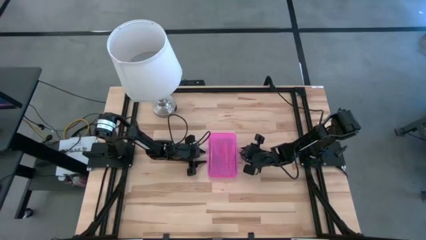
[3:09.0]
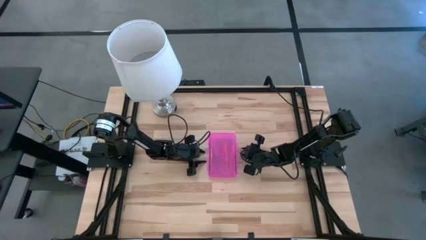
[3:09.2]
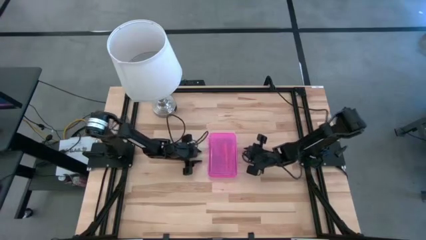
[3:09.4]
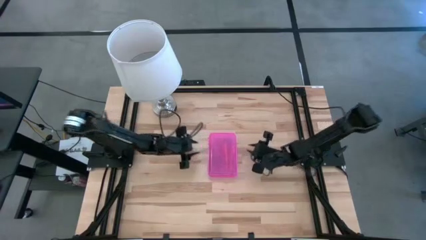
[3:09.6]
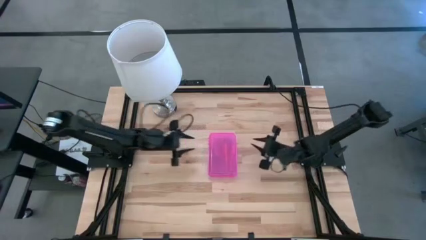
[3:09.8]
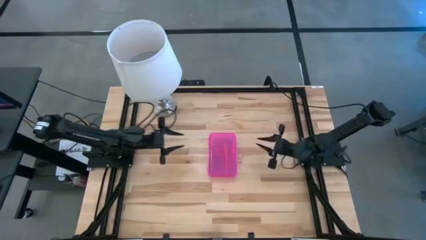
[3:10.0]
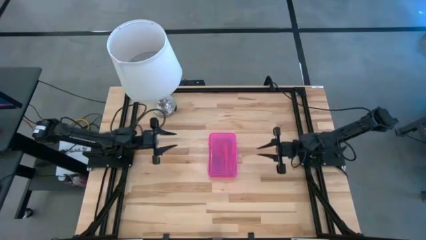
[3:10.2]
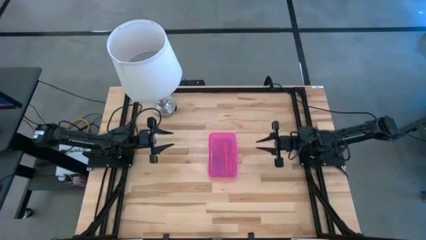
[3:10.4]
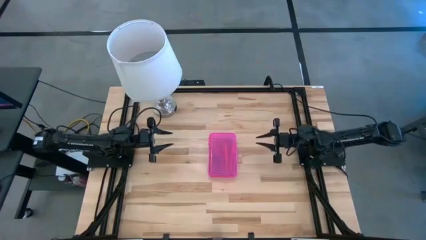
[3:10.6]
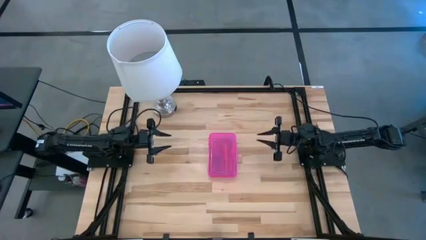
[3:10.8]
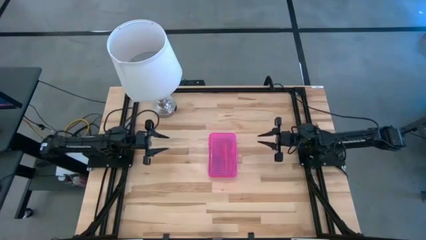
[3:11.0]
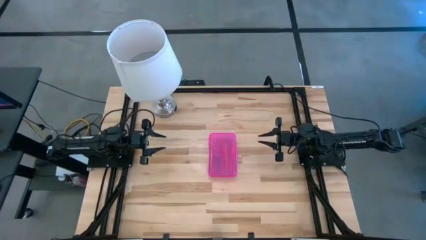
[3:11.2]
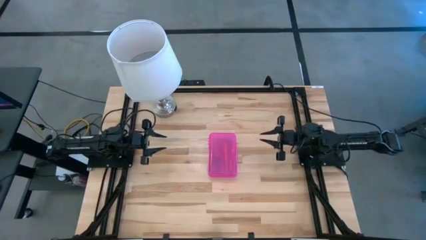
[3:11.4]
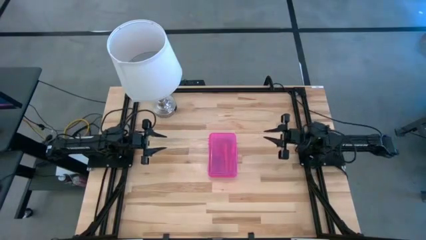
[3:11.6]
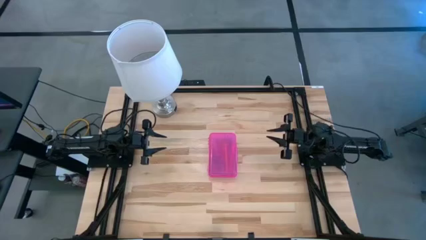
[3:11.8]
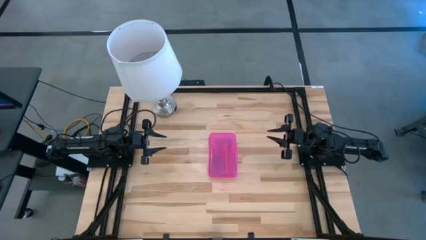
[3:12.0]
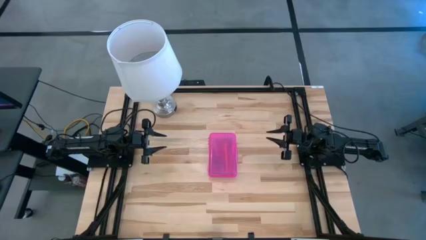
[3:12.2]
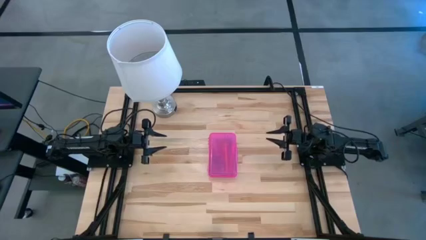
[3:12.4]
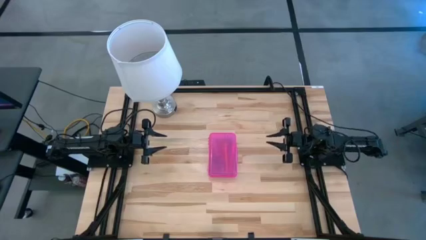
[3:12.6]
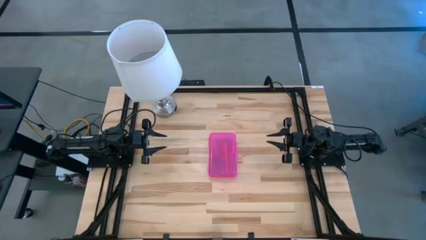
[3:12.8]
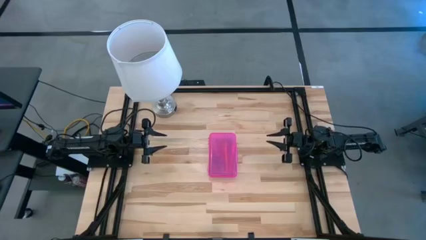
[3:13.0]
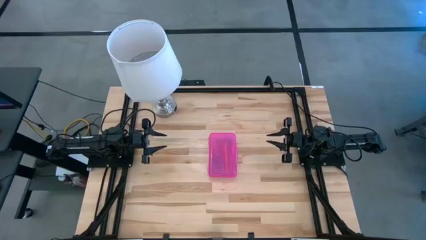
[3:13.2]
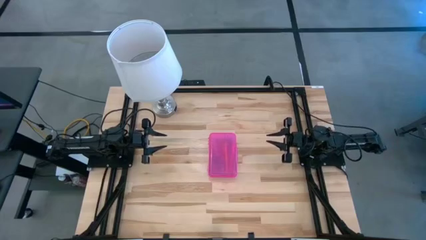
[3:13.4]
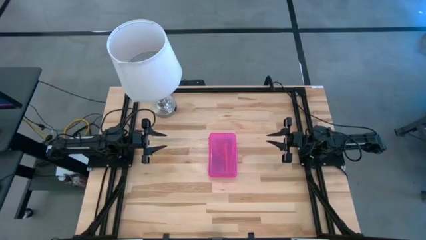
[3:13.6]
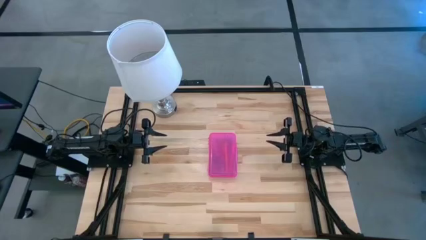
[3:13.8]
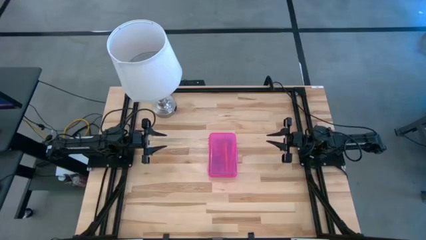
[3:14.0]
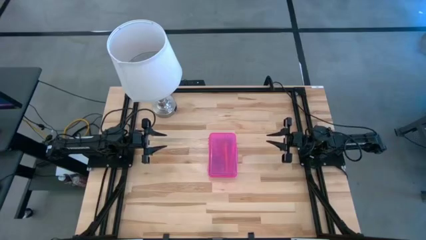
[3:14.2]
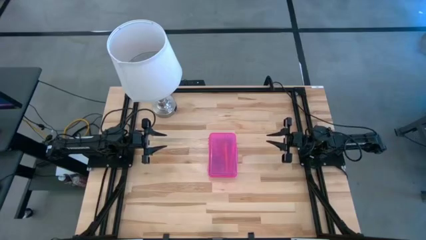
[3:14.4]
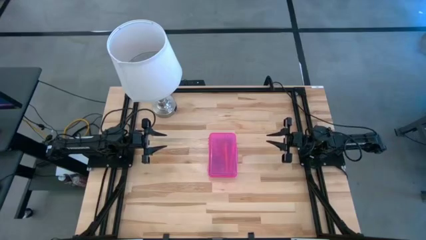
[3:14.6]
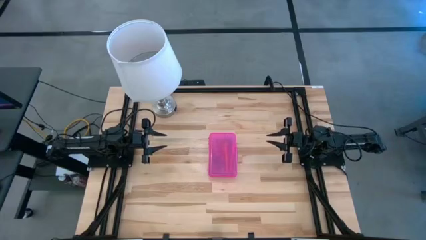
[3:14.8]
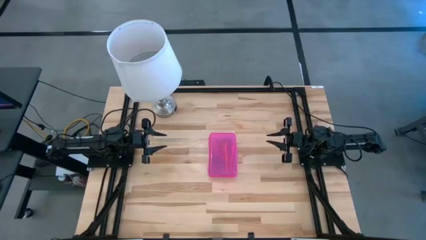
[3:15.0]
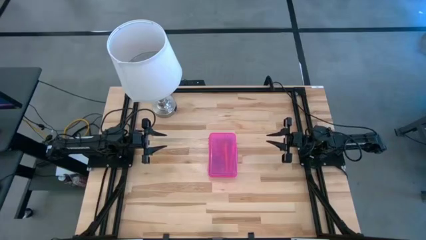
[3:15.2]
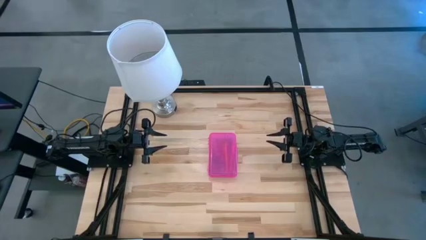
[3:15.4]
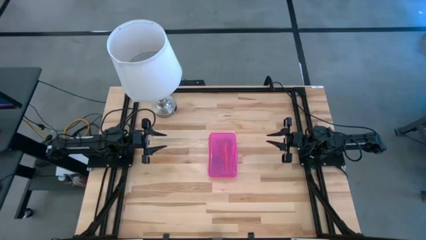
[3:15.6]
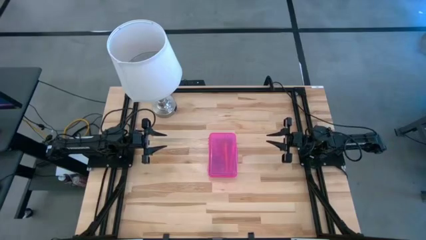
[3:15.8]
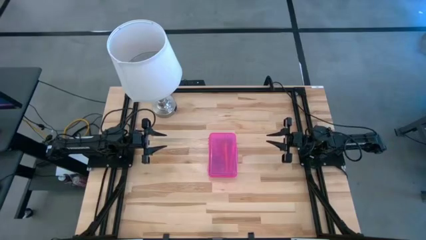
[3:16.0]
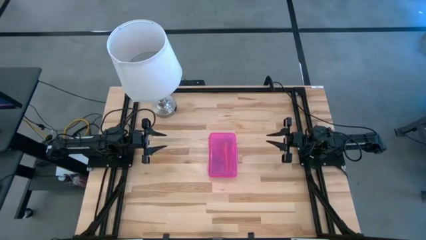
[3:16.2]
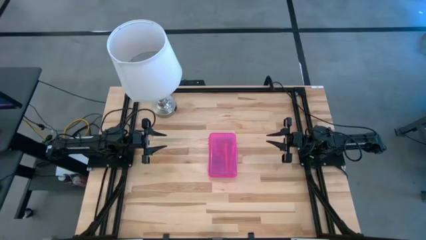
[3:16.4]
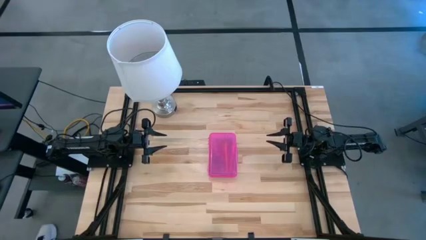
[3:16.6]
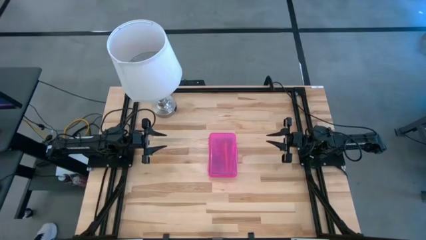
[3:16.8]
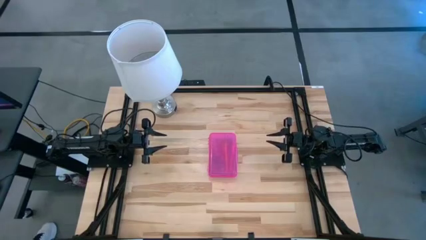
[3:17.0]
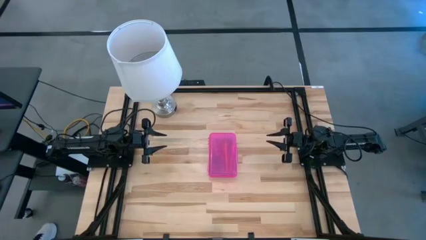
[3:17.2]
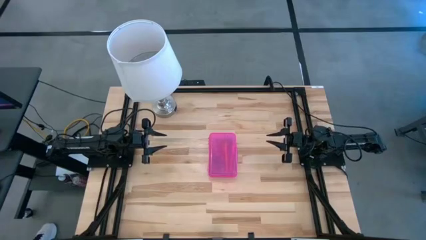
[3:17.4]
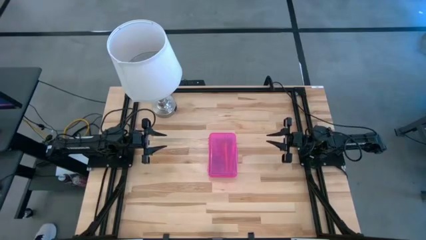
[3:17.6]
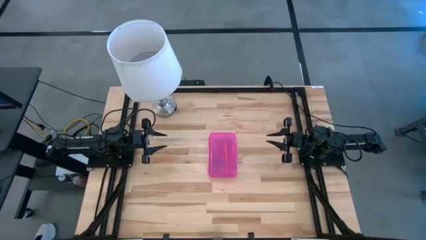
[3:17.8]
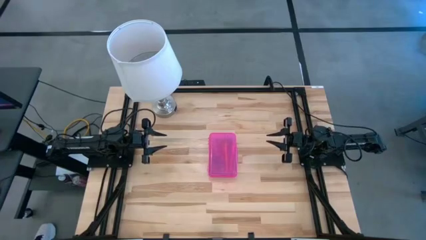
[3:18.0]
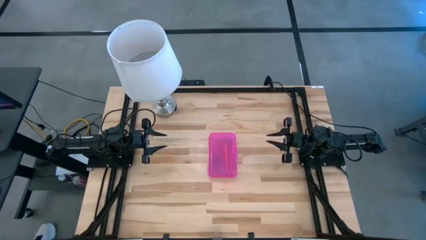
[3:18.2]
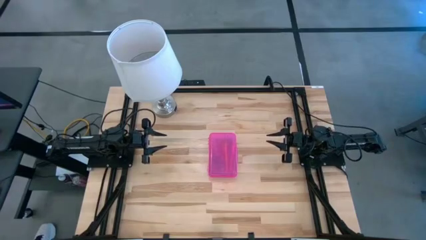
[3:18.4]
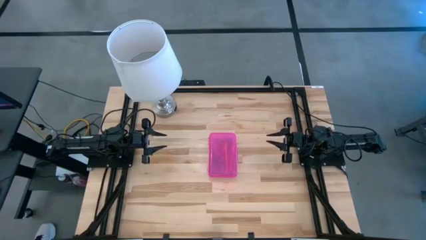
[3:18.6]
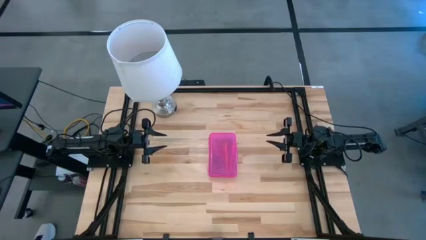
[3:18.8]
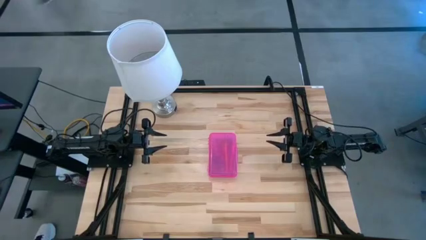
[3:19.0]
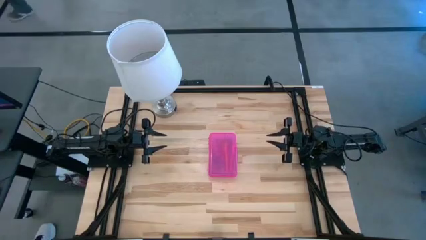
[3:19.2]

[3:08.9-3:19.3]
Task: Pick & place school supplies into a supply box
Return to Home Position

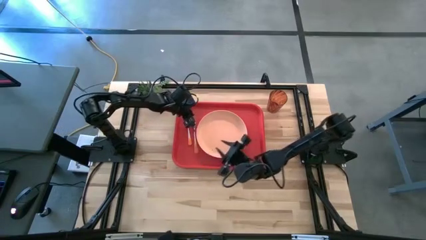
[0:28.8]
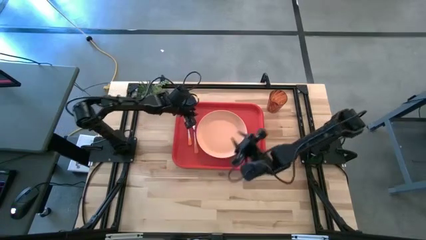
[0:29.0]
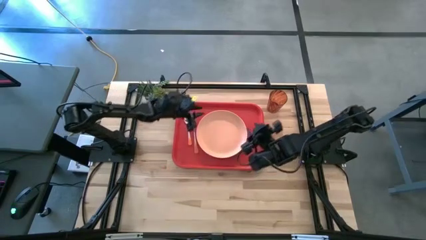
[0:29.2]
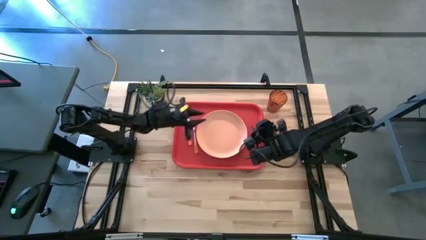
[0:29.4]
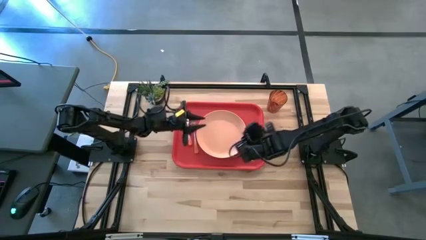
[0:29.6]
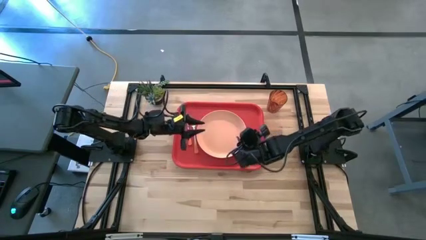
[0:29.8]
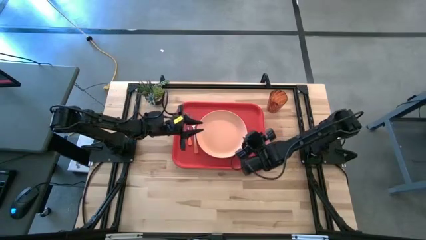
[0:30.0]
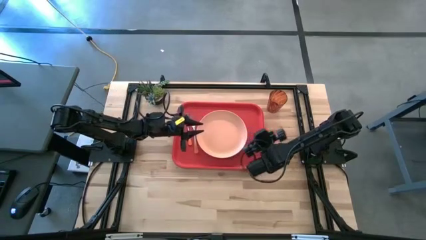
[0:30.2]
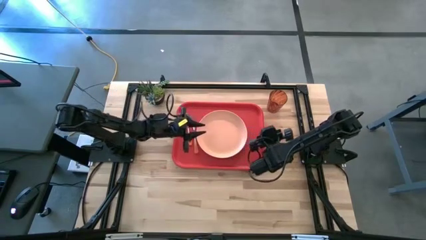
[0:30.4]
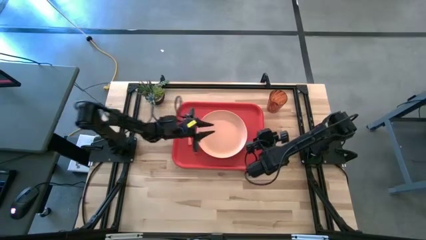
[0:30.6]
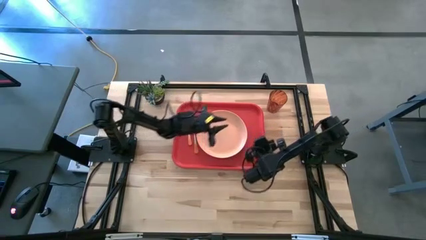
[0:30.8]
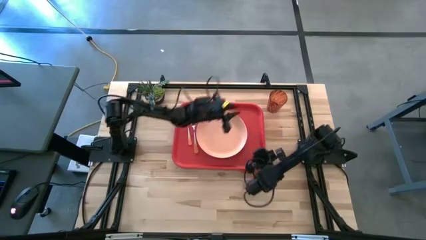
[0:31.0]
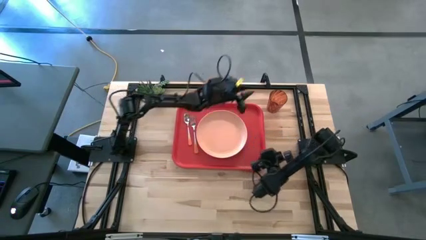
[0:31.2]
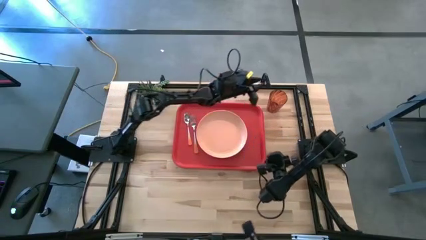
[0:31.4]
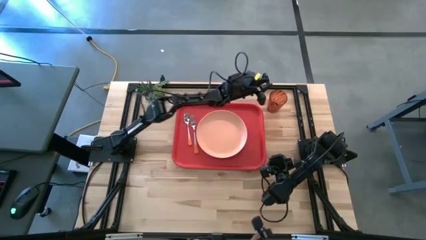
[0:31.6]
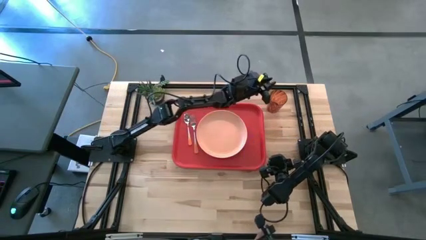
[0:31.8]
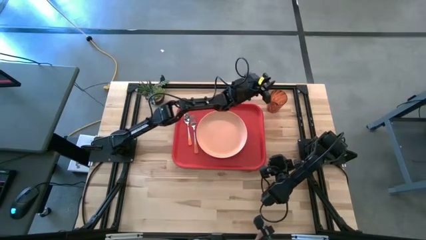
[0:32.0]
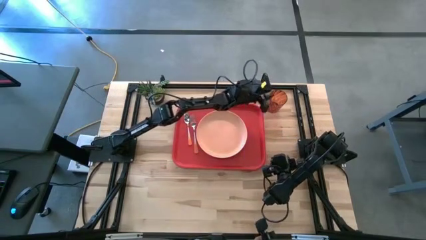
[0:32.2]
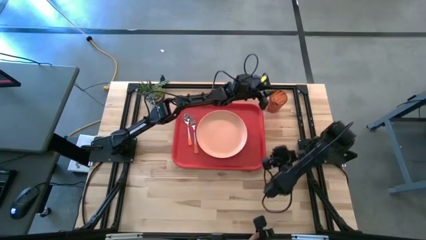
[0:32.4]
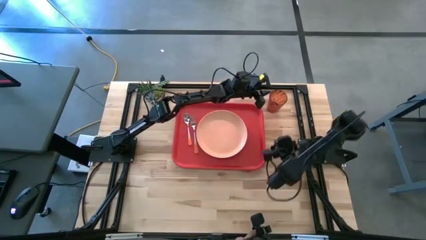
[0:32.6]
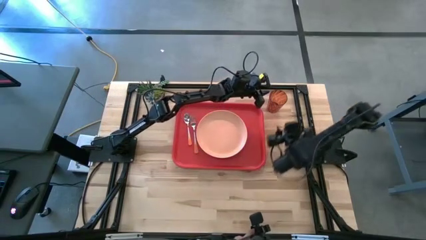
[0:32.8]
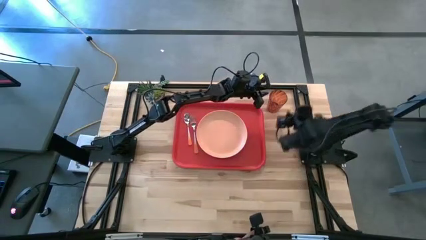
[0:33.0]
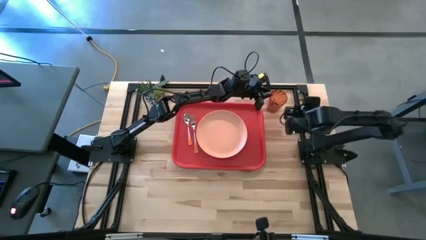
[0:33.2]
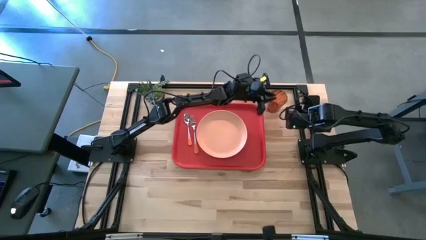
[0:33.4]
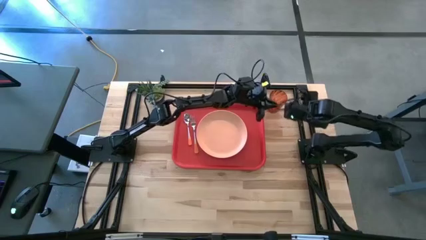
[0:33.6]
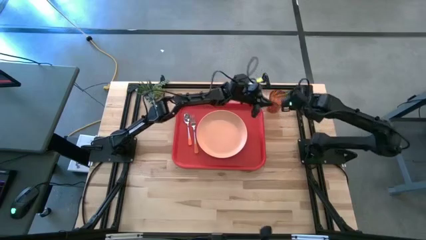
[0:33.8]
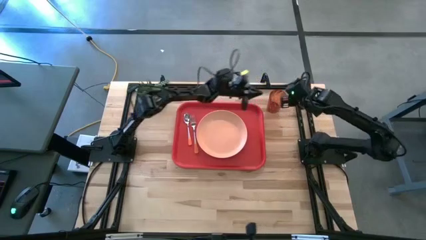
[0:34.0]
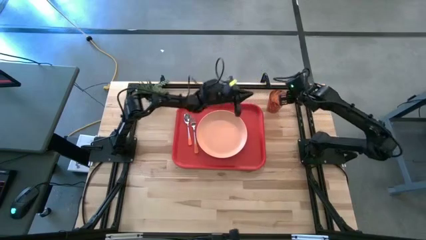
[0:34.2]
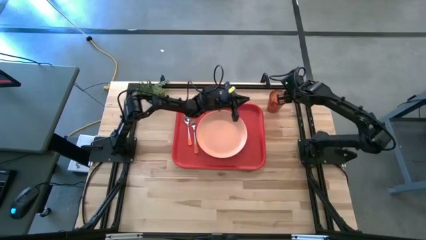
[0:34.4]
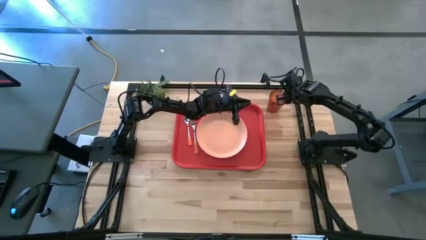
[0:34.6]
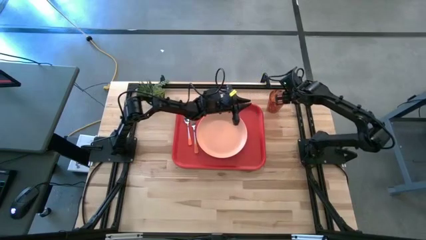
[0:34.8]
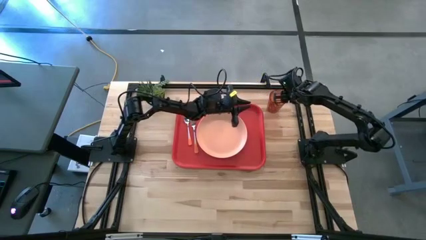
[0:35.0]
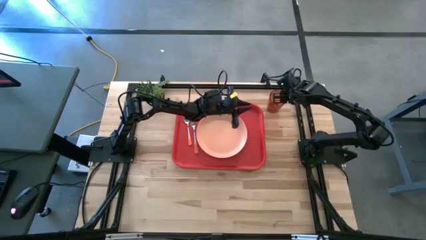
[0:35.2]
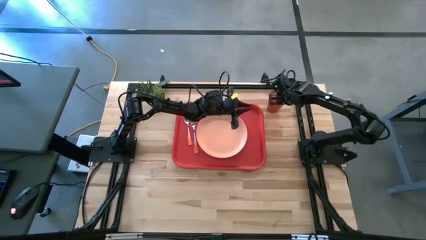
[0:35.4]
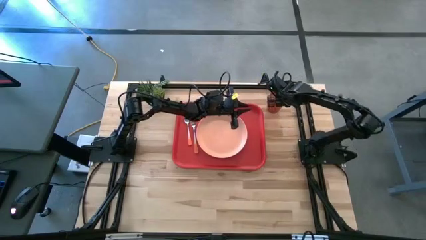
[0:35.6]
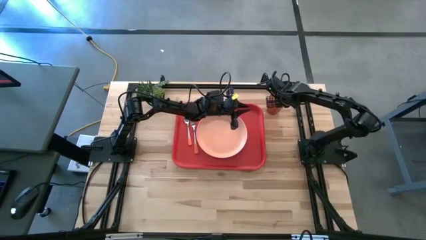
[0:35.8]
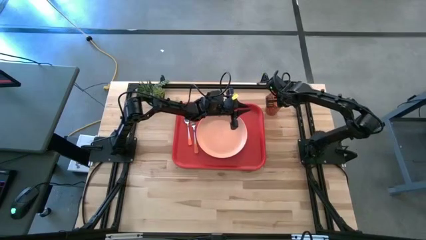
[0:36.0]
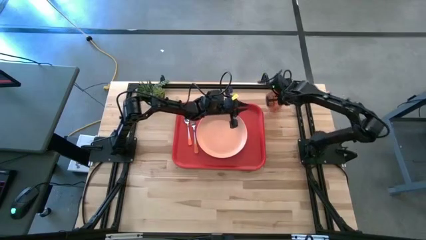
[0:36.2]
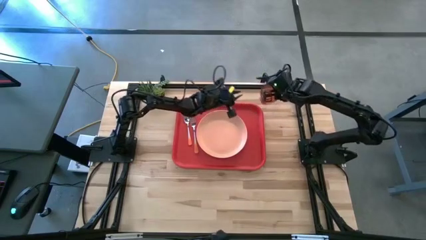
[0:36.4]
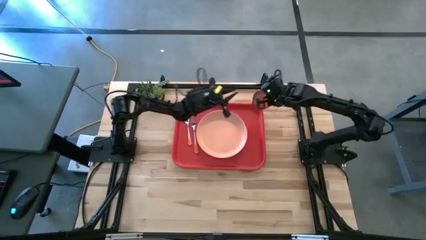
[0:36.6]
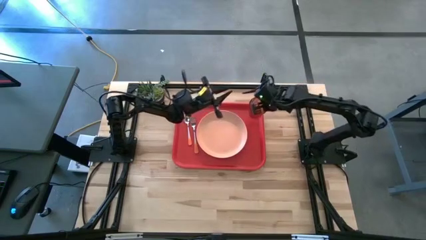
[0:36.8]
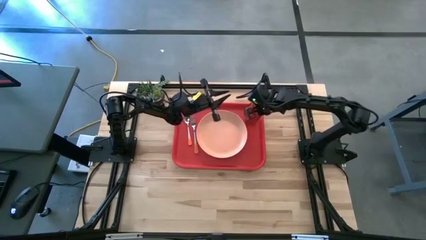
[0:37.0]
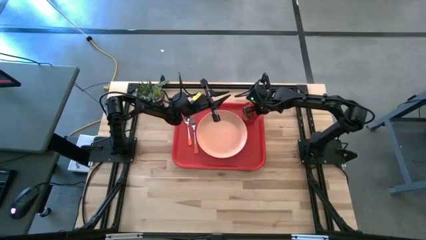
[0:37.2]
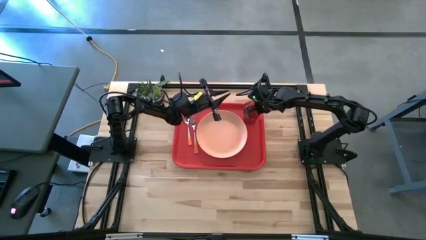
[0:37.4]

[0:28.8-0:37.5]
Task: Pick and place plate/cup/fork/spoon on tray
Put the brown cup on the red serving tray
